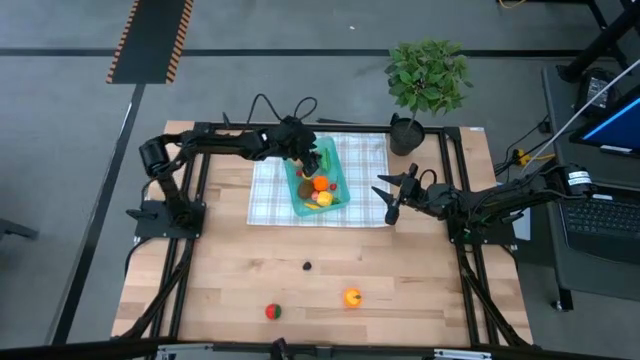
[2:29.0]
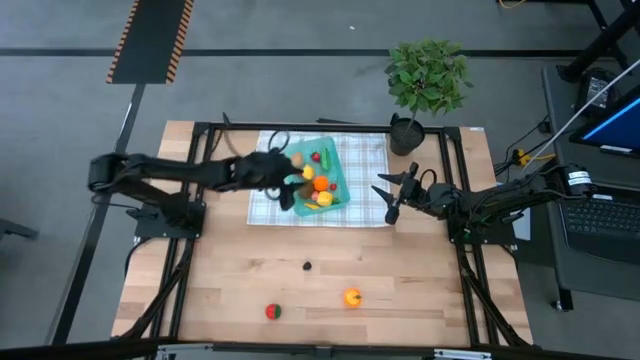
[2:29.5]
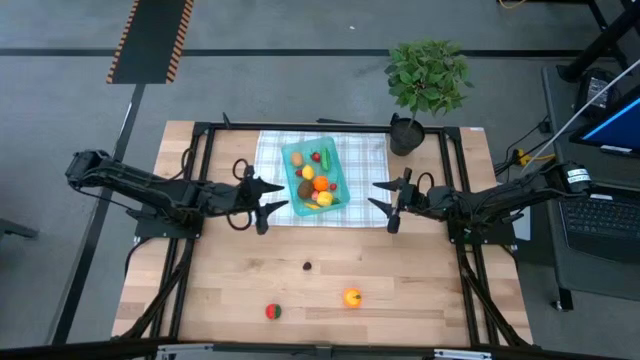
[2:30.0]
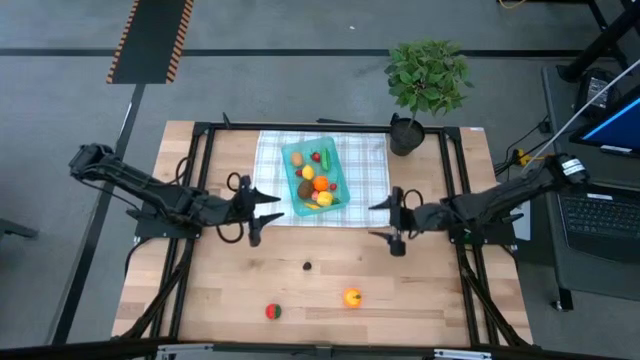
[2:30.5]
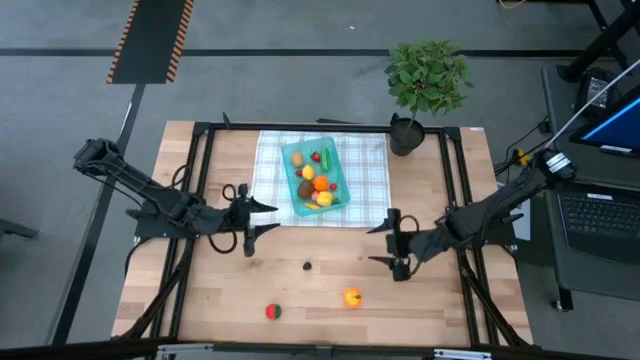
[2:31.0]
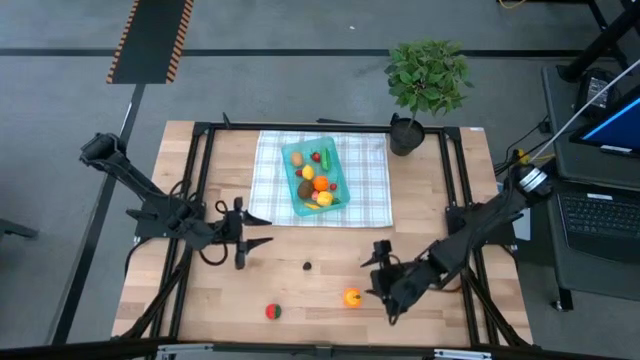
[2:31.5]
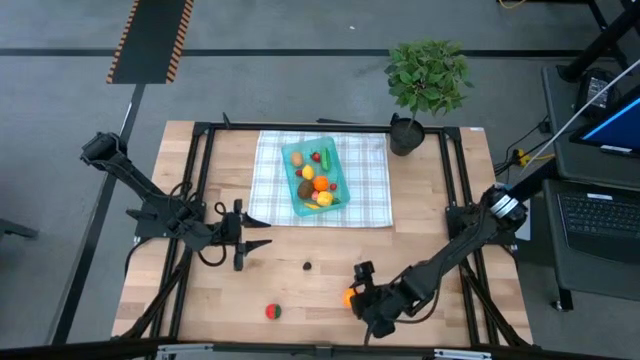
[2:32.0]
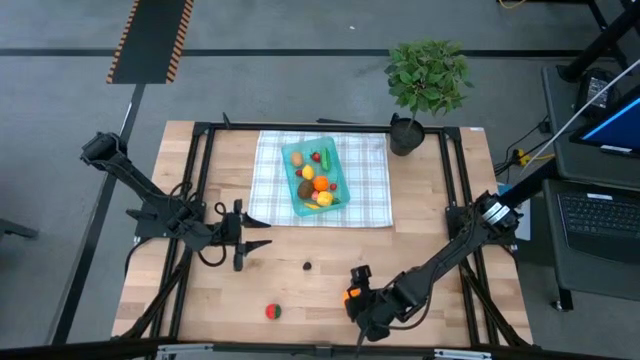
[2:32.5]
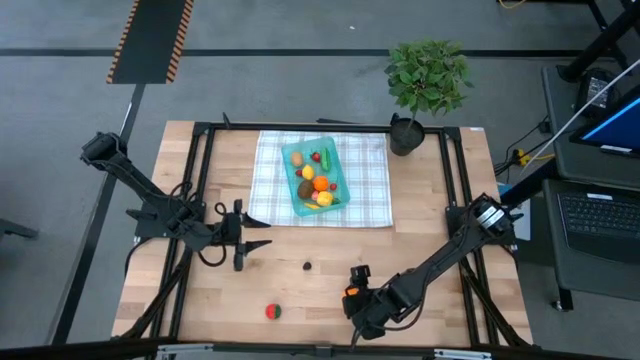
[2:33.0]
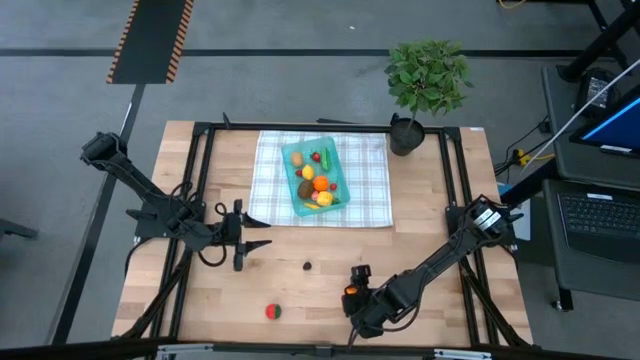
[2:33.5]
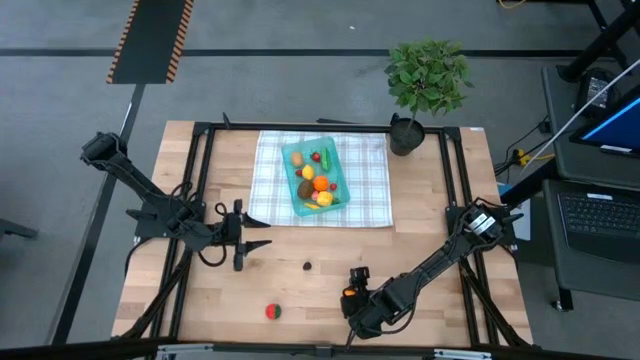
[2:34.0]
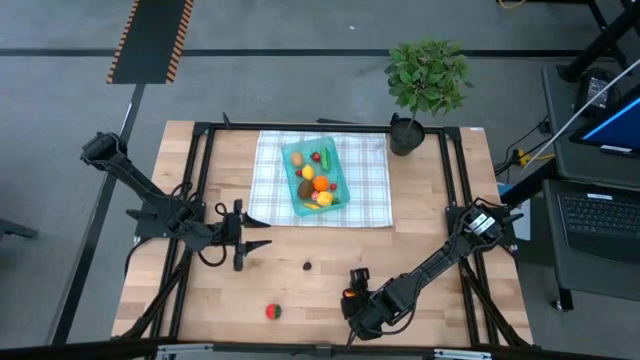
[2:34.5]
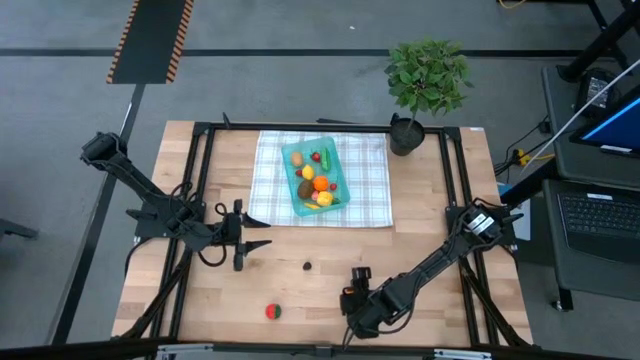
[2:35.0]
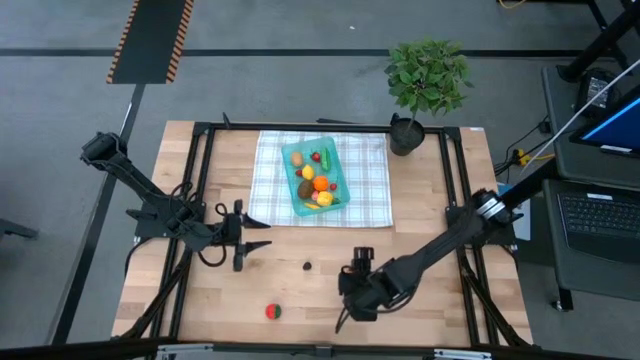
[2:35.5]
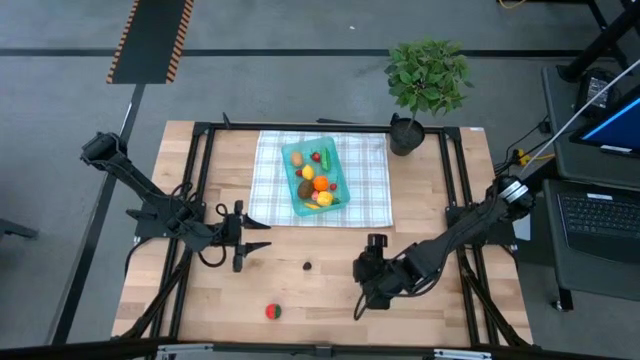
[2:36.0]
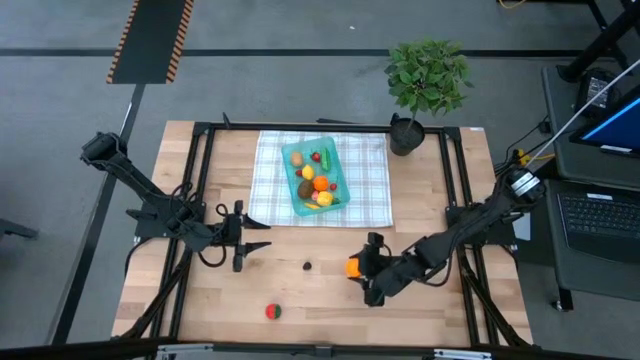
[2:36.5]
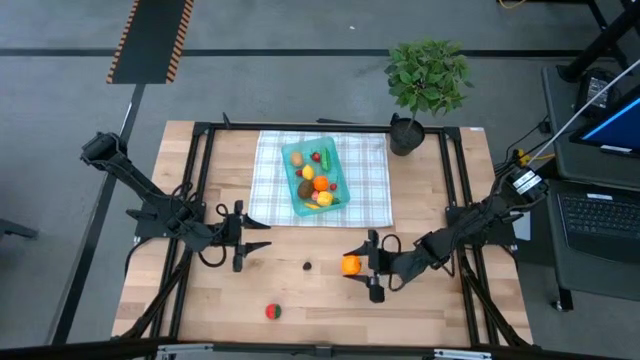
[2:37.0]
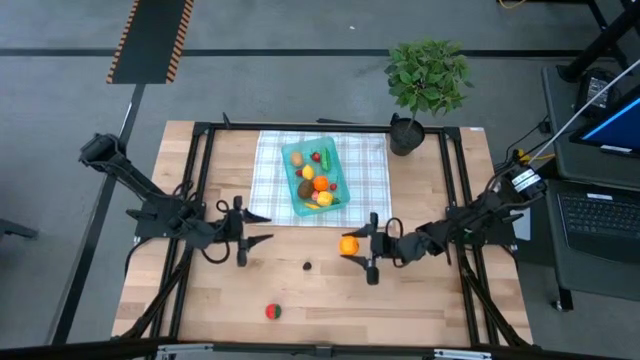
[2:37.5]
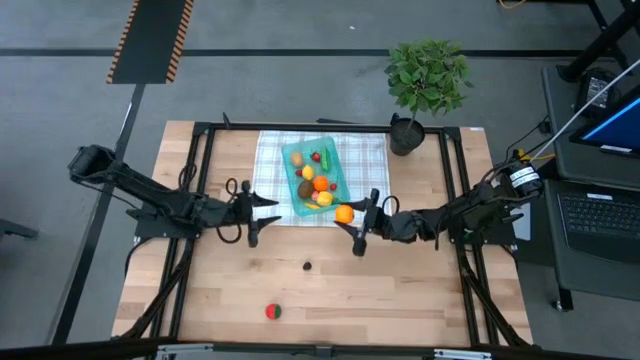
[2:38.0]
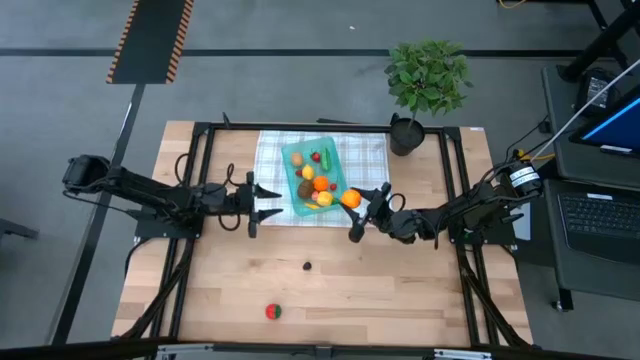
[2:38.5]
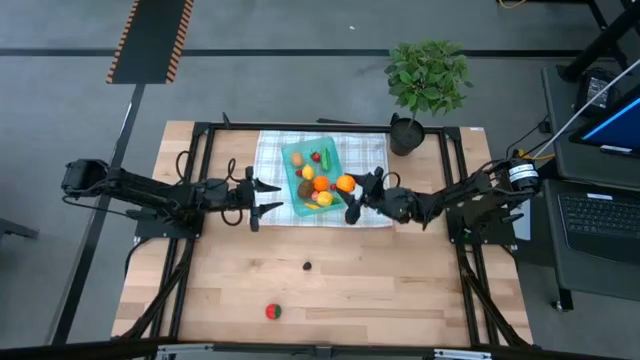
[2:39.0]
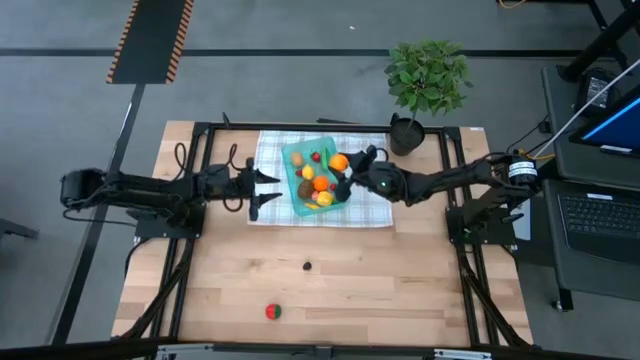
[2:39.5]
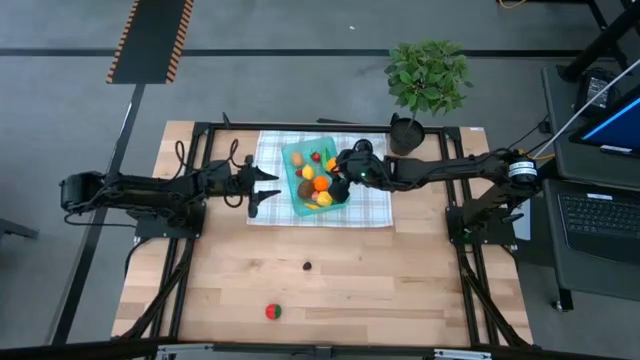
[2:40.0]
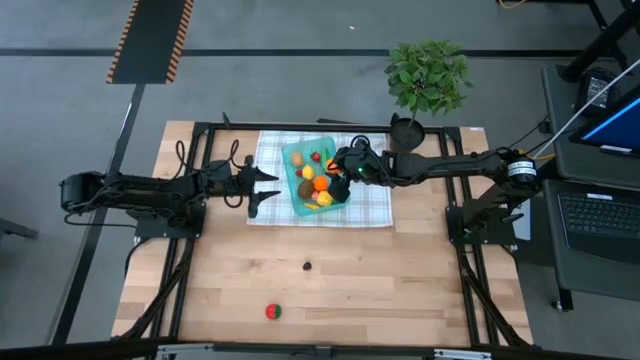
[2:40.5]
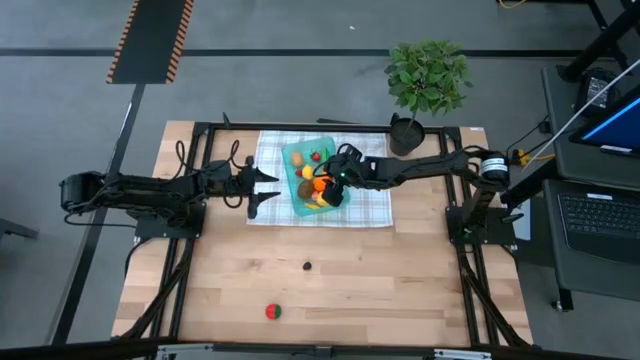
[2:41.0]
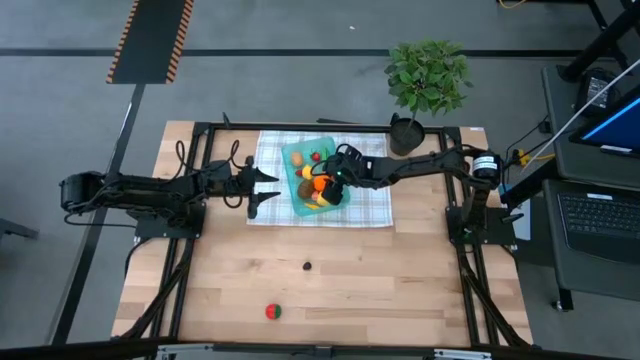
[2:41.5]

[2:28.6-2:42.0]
Task: Pick and placing Produce into tupperware
Put the orange into the blue bin

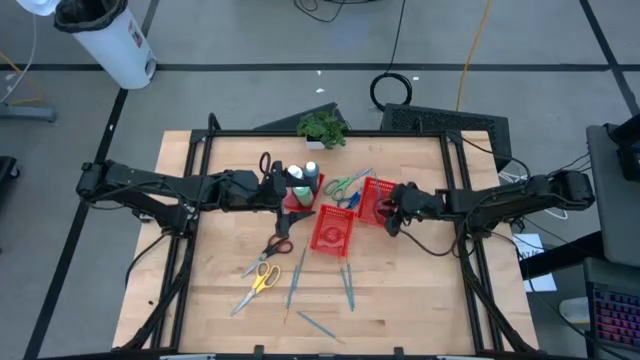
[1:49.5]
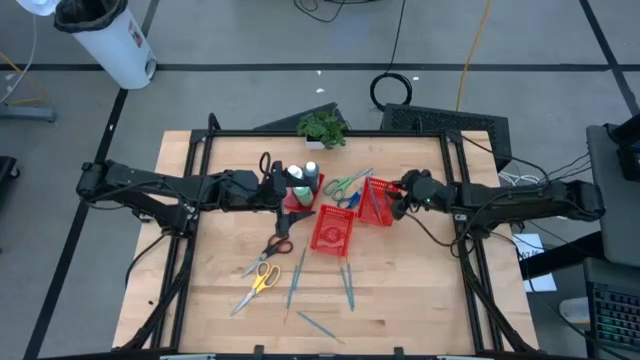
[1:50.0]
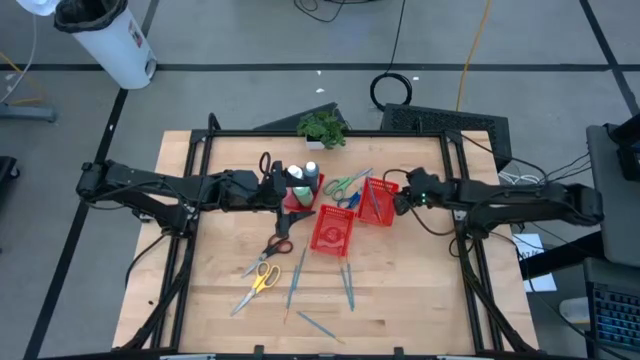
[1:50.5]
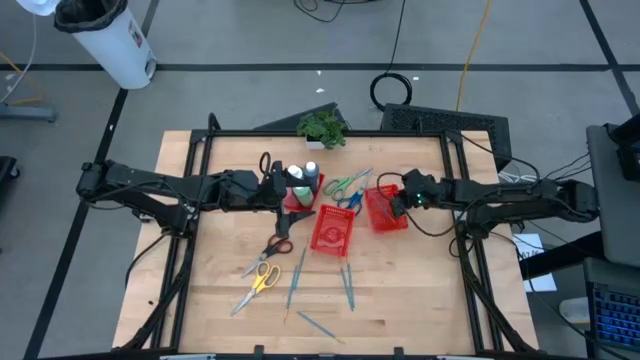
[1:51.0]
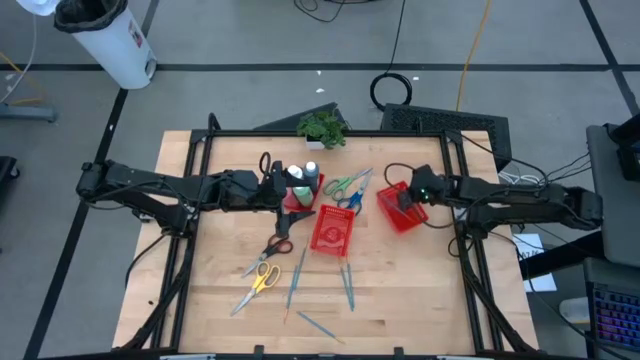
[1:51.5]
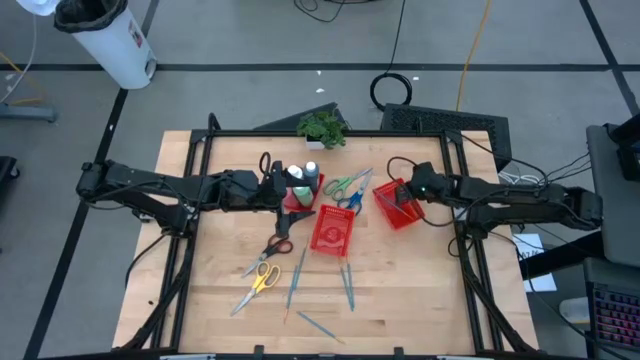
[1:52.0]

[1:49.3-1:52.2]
Task: Pick & Place Paint Supplies
Adjust the right red bin on the table

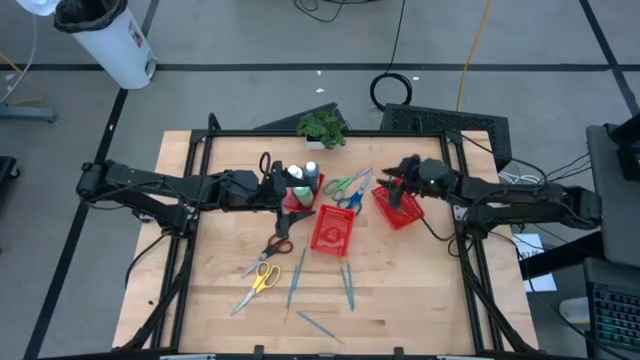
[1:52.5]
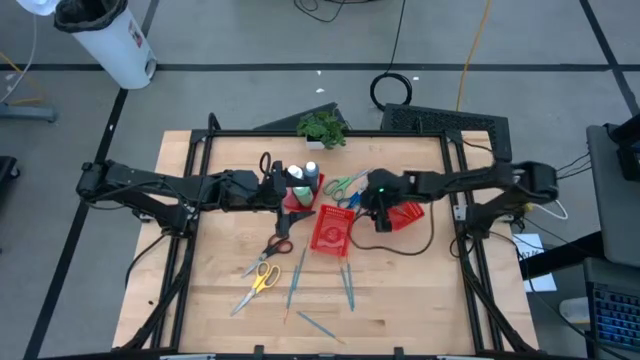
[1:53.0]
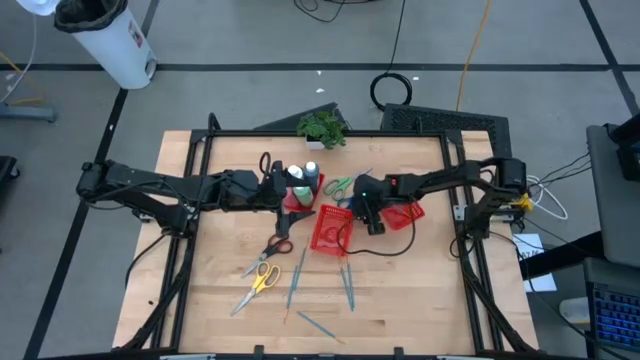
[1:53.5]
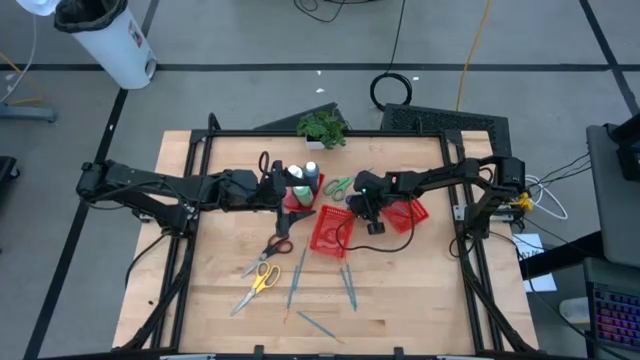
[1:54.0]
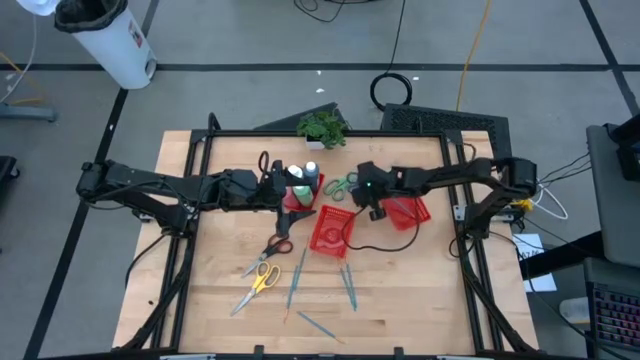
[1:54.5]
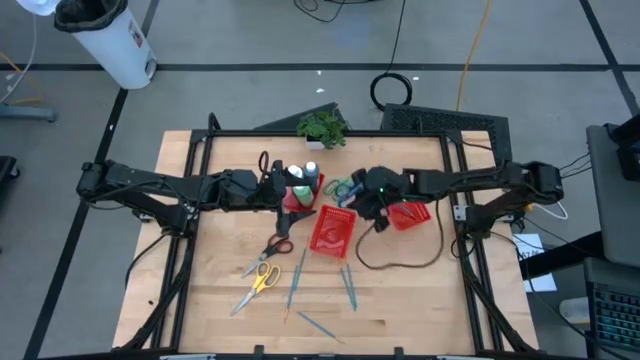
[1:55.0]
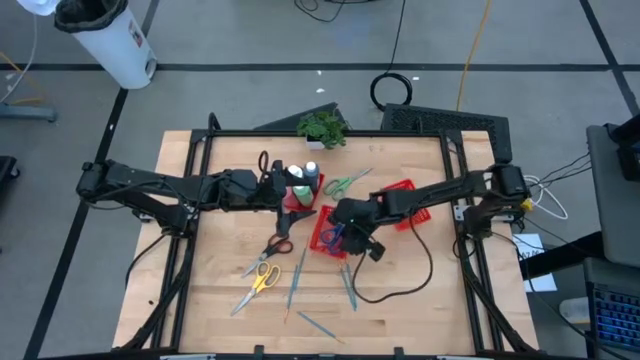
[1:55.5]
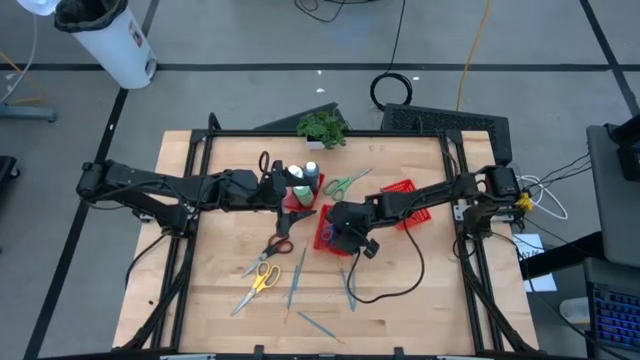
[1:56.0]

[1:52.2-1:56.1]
Put the blue scissors into the middle red bin

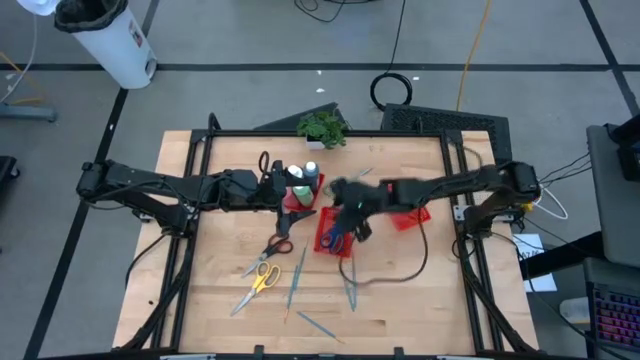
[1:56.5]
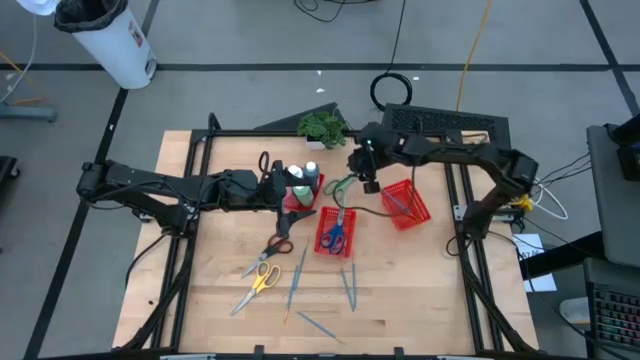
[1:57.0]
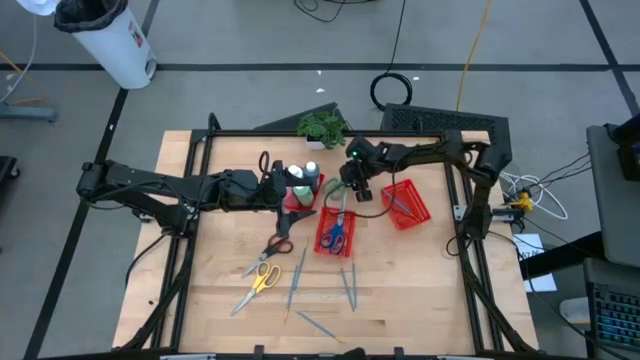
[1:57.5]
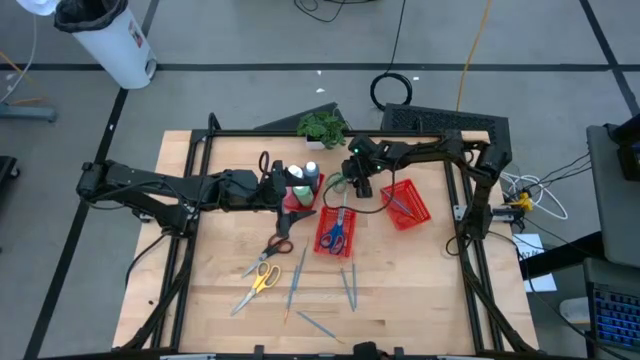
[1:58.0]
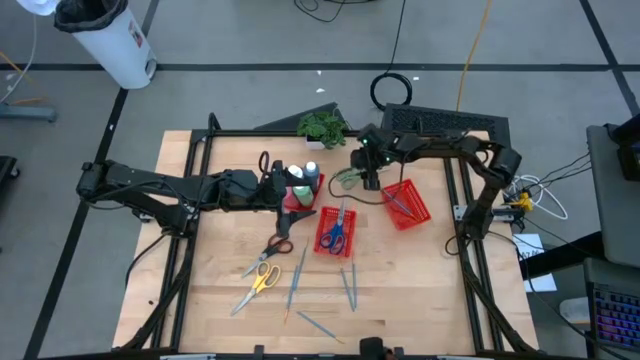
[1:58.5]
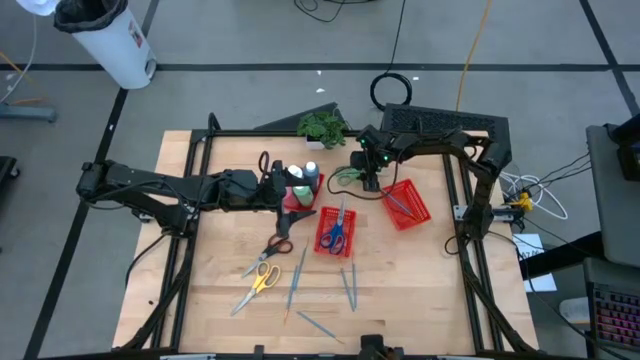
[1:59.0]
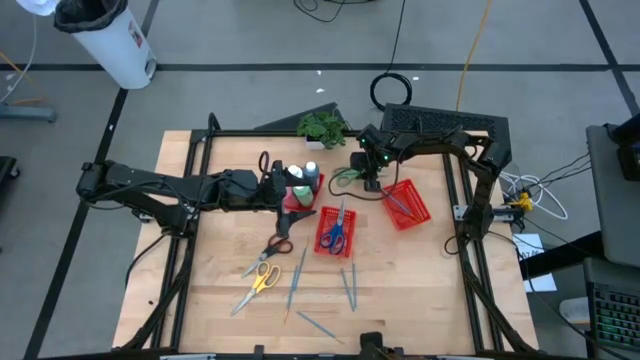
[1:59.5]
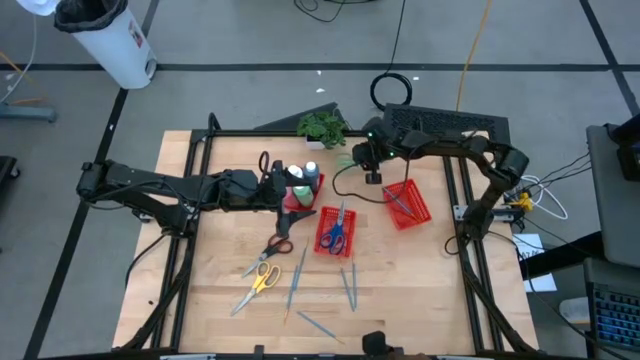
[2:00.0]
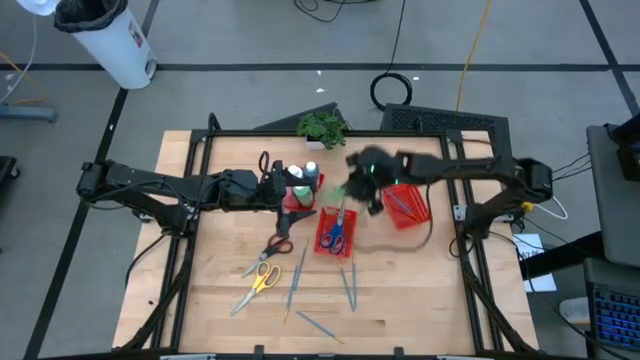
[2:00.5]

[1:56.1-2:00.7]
Put the green scissors into the middle red bin
